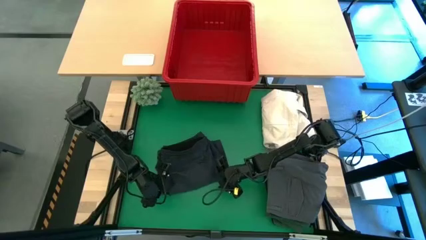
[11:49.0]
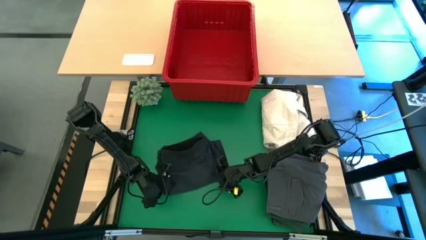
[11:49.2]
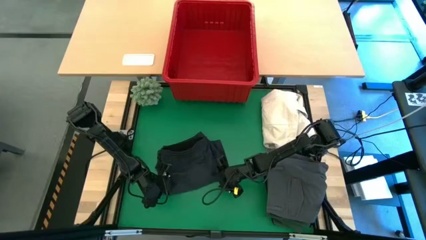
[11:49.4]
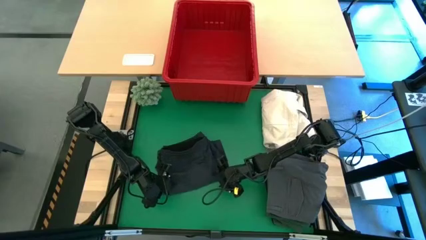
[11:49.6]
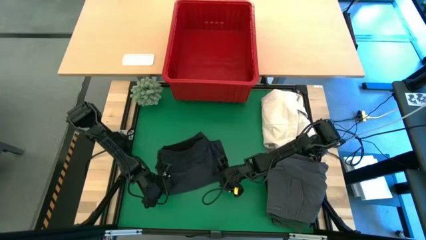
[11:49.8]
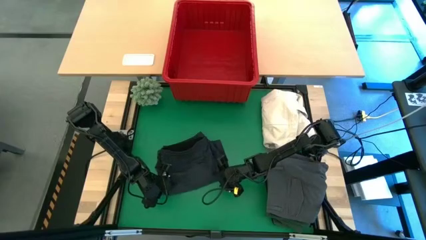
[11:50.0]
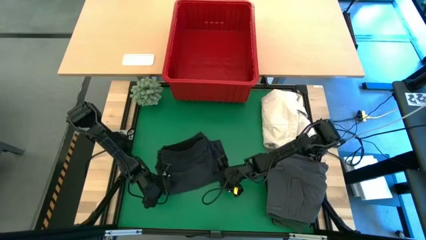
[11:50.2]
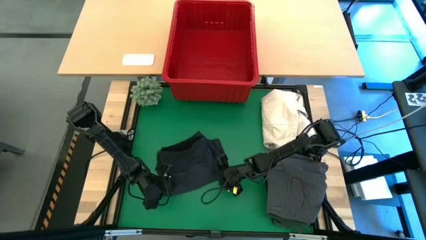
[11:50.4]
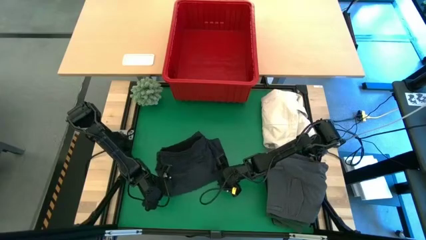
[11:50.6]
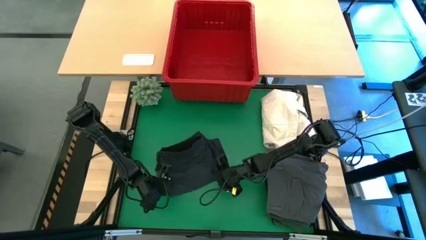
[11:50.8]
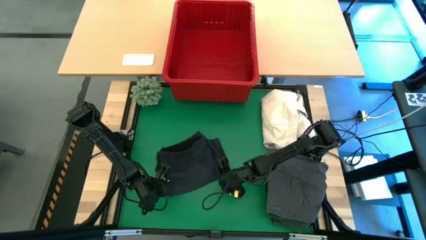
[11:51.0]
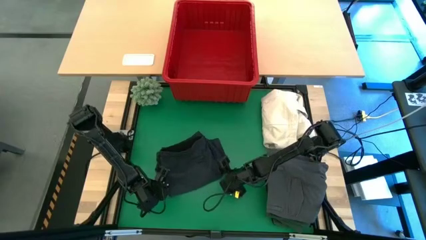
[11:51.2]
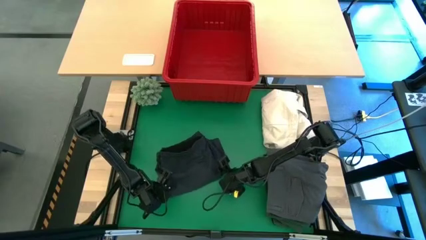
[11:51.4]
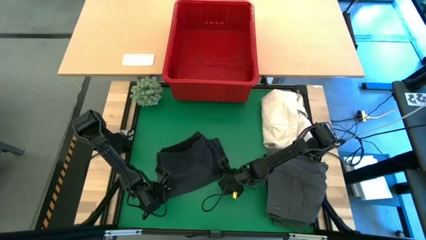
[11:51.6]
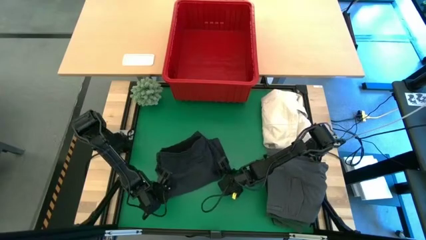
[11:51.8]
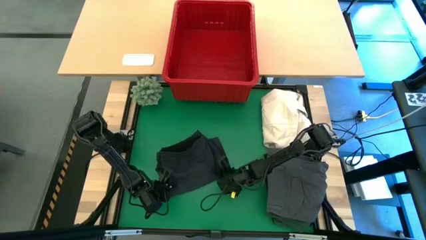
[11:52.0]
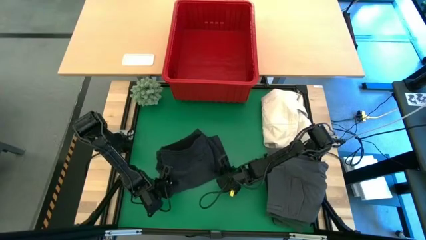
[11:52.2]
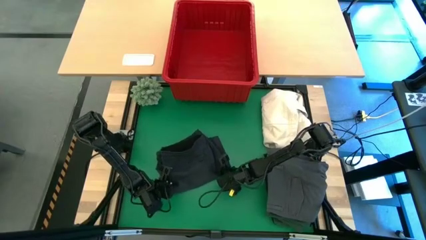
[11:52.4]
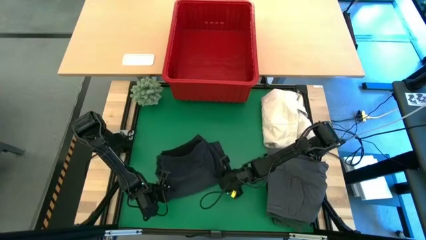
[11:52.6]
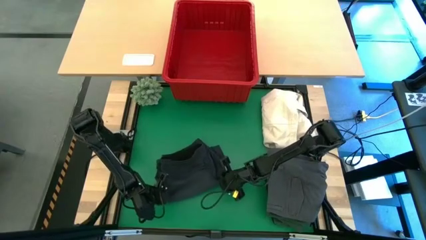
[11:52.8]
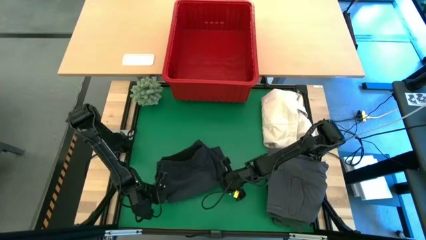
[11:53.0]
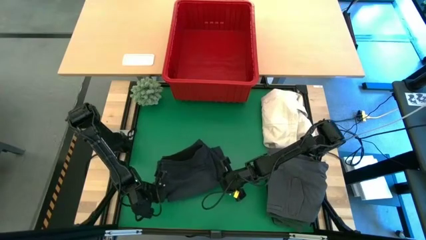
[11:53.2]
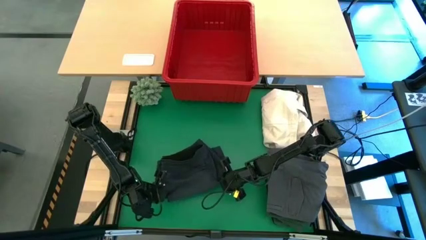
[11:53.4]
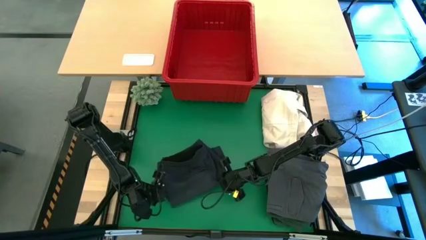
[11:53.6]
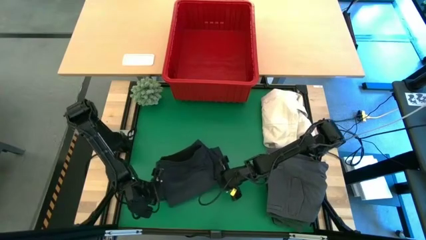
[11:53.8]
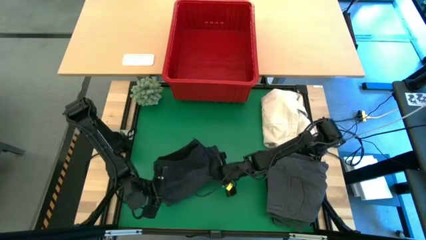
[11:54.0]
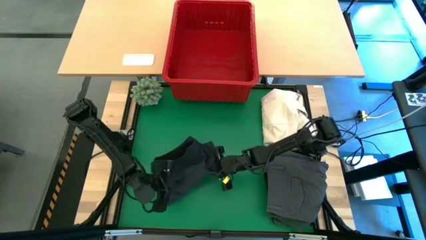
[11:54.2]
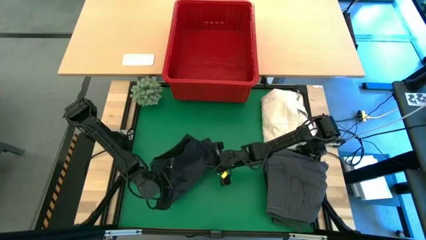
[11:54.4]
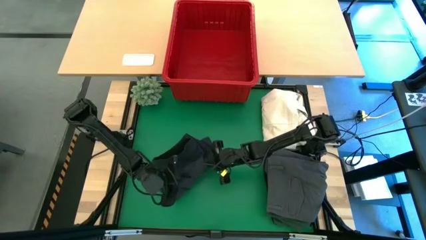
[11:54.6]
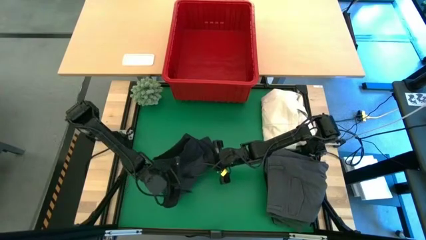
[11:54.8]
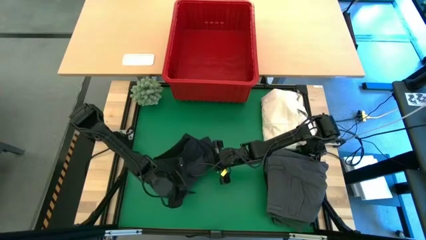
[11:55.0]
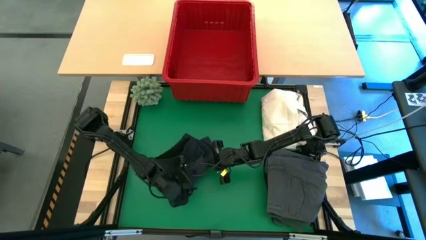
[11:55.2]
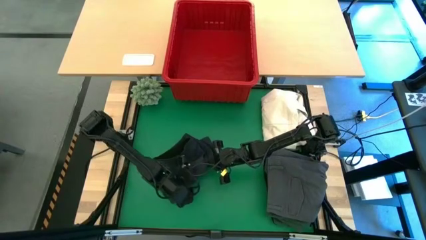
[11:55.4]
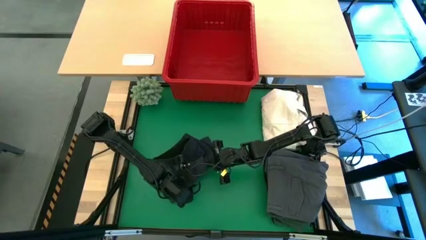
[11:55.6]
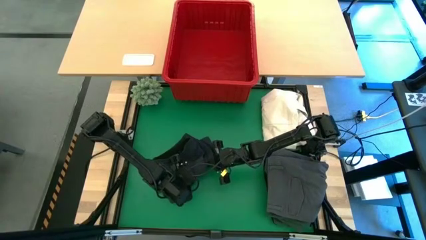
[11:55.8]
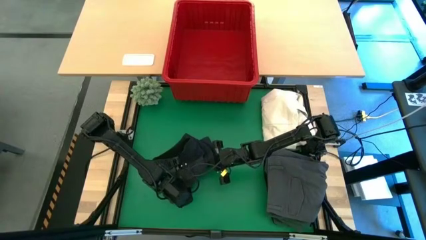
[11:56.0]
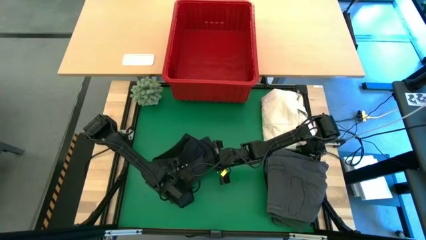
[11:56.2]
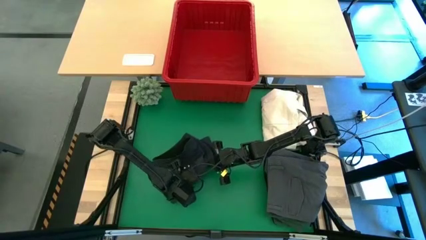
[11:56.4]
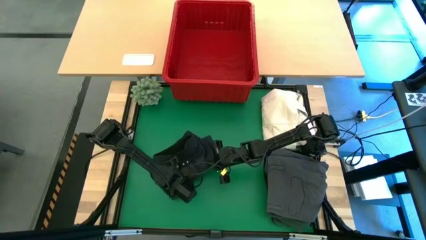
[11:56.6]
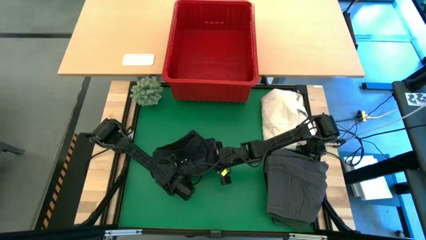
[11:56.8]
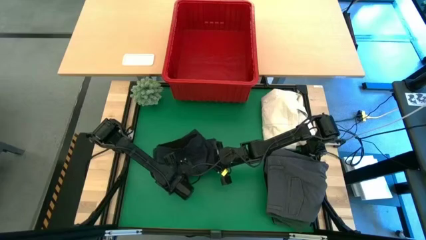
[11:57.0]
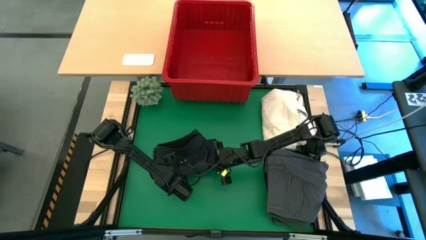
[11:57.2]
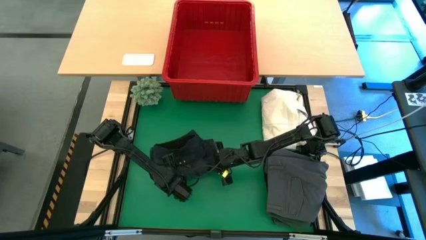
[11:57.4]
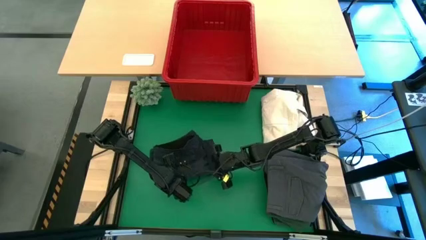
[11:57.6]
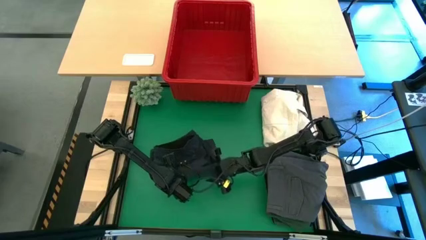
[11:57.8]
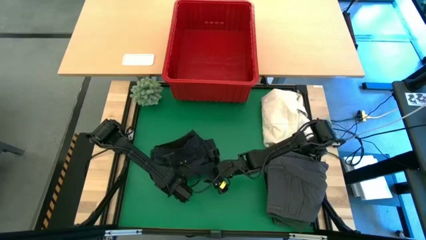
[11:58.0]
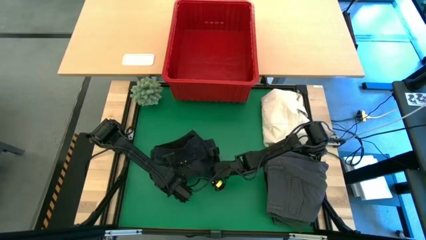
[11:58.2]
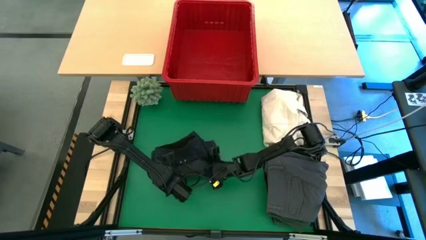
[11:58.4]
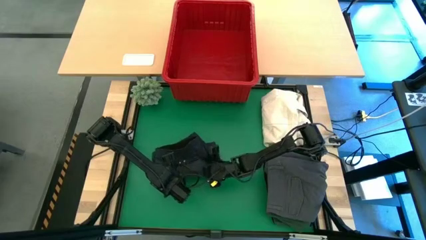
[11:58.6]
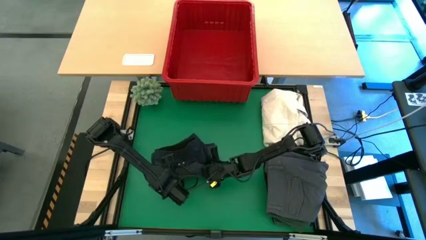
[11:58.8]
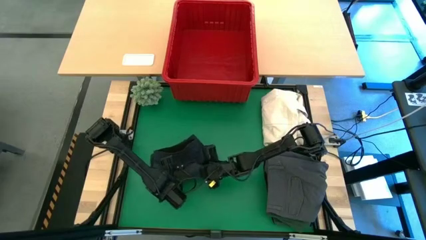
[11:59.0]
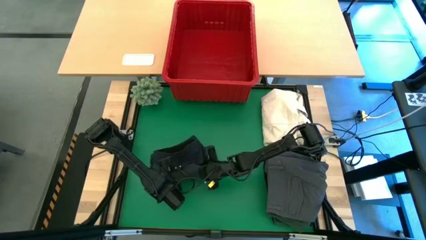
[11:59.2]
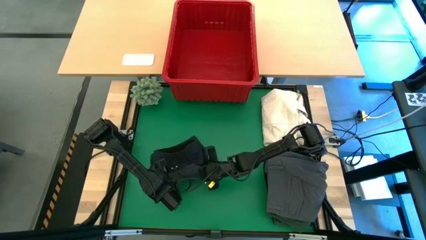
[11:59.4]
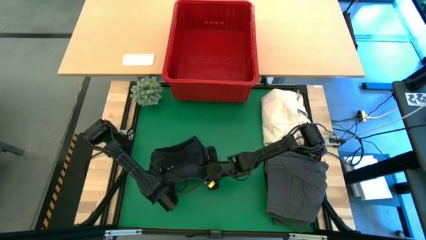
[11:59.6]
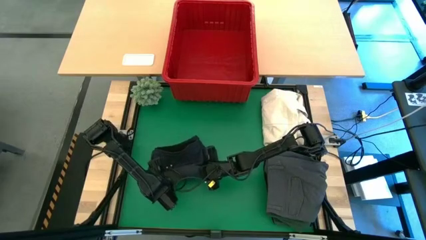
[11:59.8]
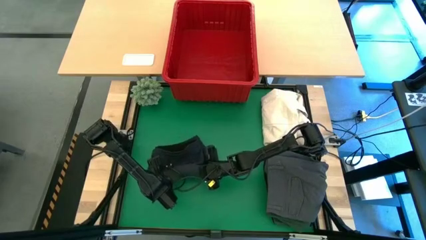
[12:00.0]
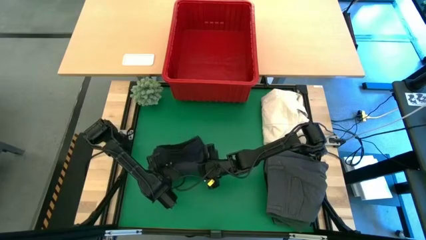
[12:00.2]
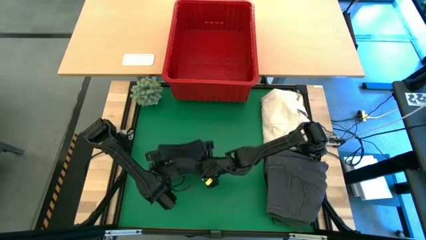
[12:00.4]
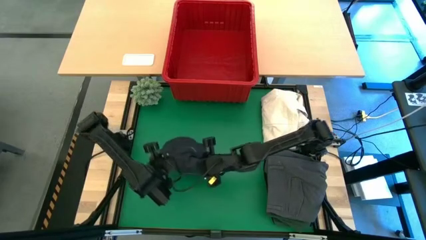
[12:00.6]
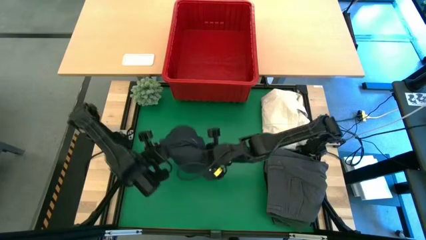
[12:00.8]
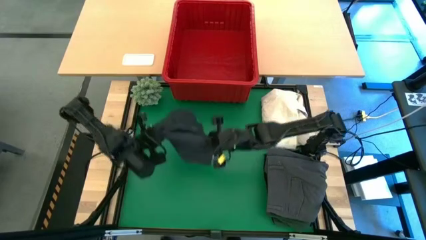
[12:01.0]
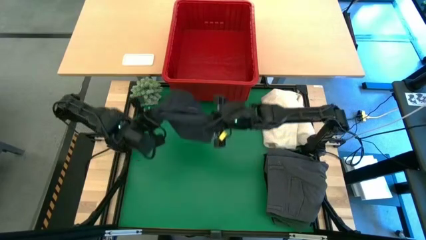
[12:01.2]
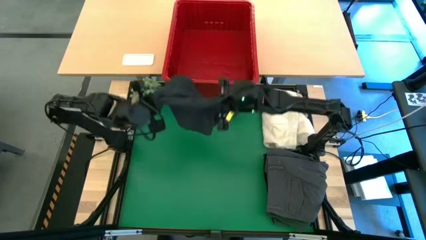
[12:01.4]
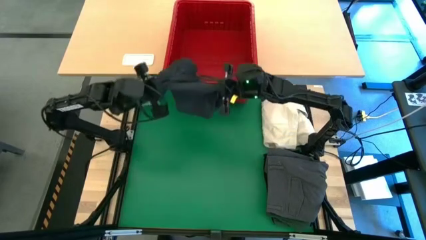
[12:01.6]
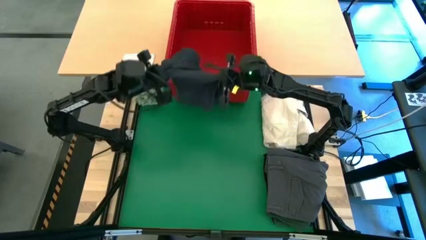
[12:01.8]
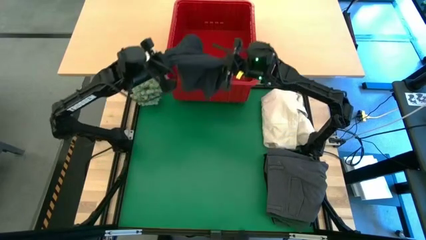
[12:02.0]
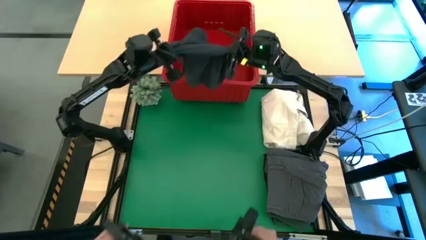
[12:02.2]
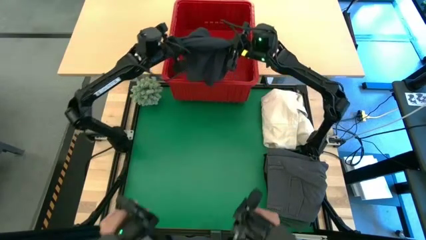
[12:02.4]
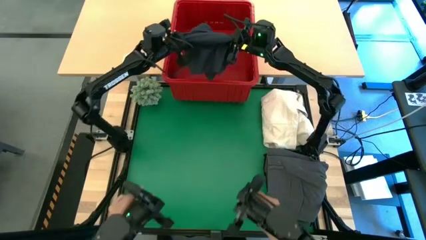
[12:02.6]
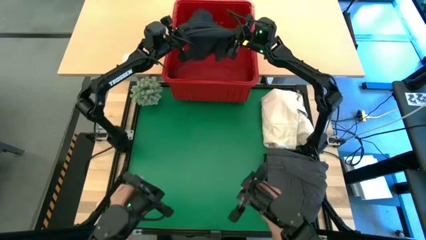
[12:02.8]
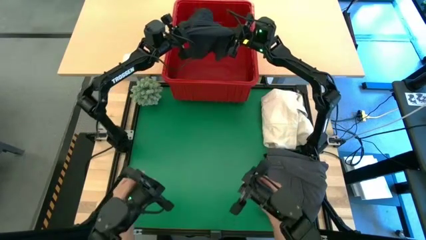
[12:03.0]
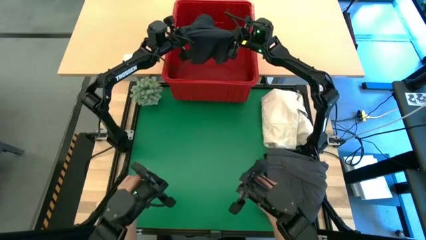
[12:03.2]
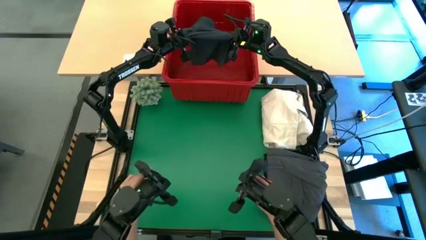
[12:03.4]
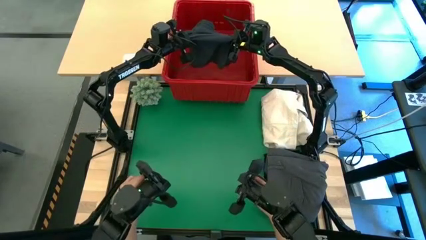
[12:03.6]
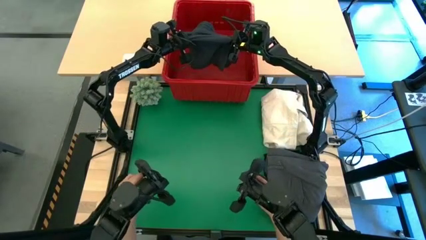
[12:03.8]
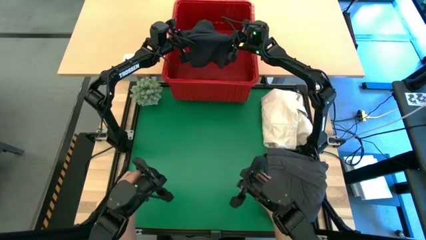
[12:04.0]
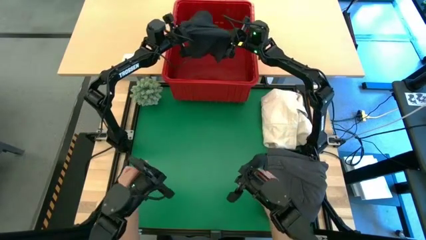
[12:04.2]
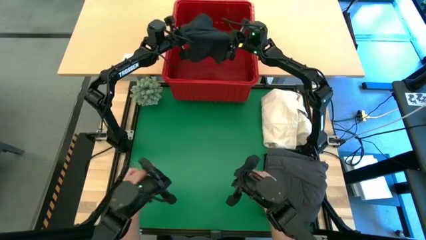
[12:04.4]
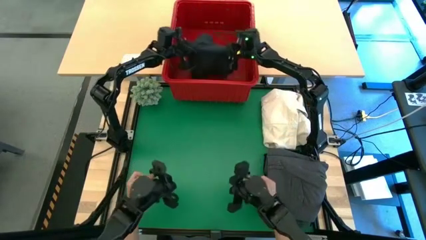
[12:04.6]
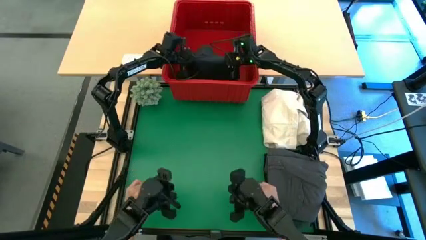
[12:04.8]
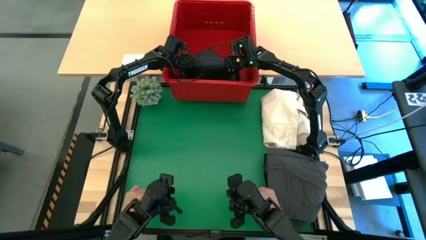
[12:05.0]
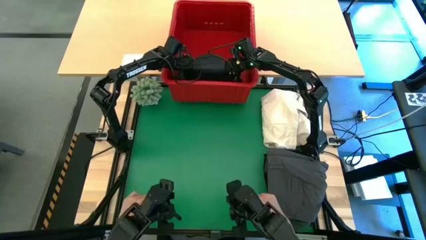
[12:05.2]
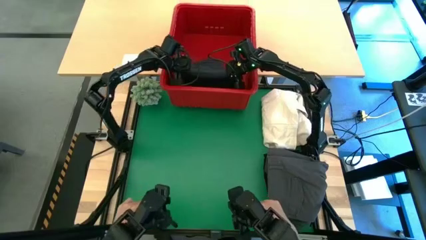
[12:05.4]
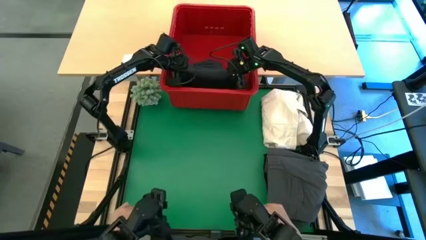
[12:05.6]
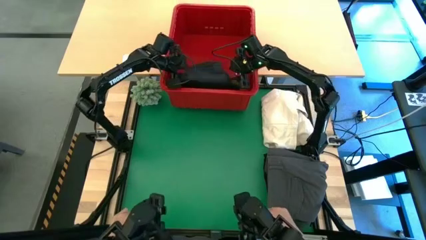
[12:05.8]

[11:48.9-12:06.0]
Task: Fold laundry
Put the gray folded shorts into the red bin
